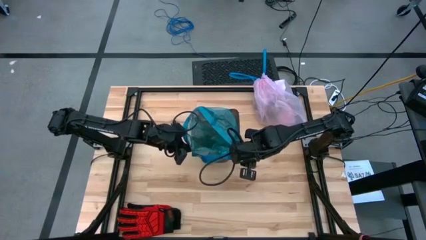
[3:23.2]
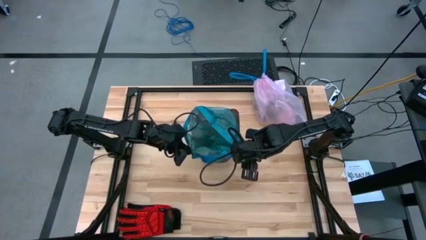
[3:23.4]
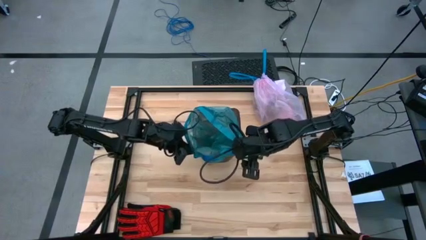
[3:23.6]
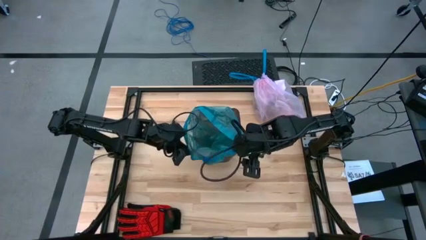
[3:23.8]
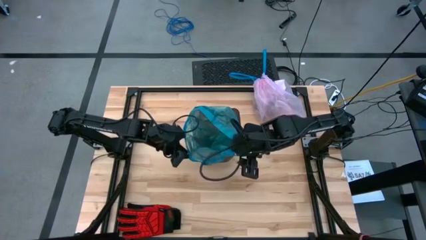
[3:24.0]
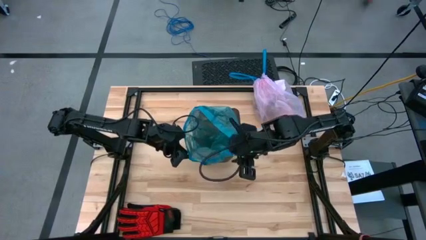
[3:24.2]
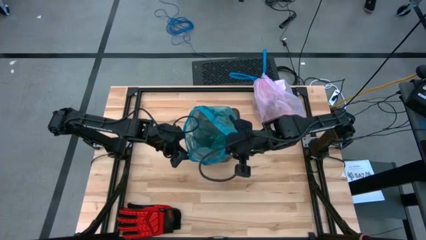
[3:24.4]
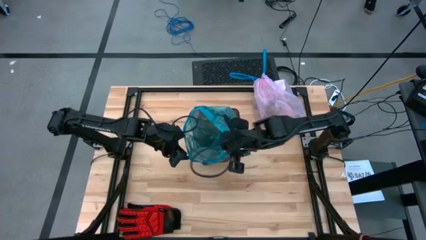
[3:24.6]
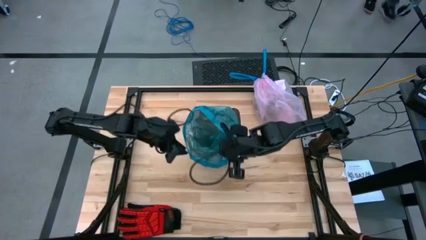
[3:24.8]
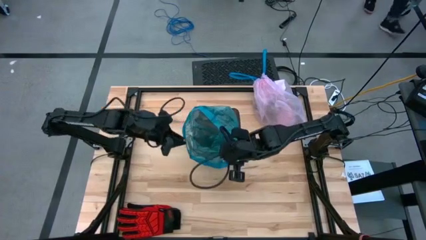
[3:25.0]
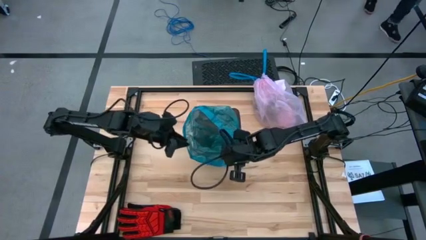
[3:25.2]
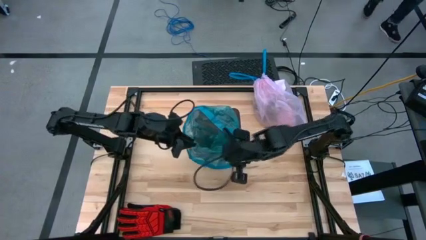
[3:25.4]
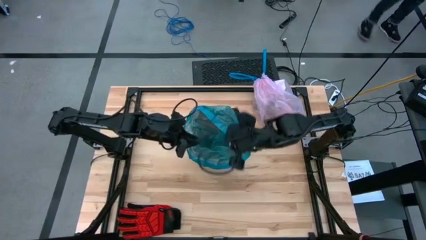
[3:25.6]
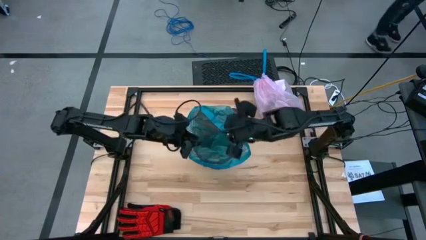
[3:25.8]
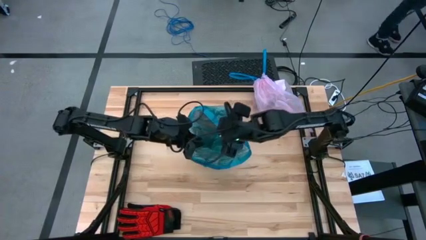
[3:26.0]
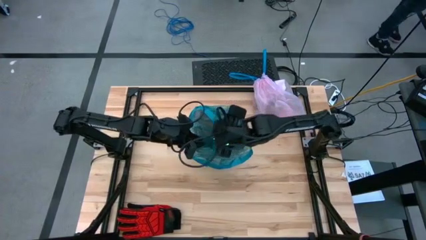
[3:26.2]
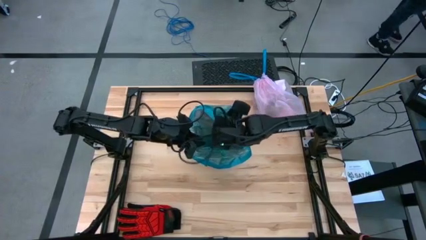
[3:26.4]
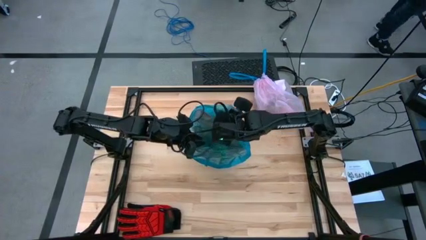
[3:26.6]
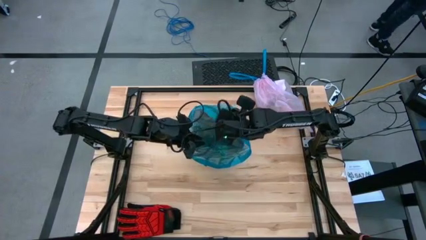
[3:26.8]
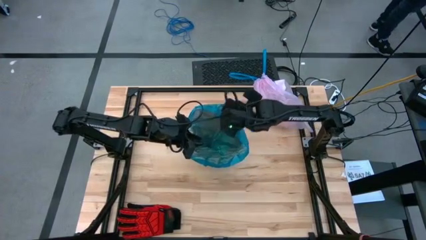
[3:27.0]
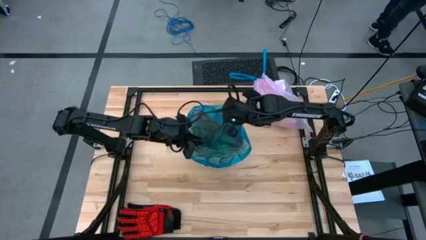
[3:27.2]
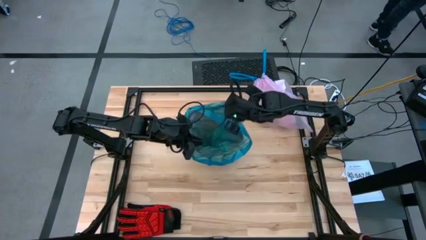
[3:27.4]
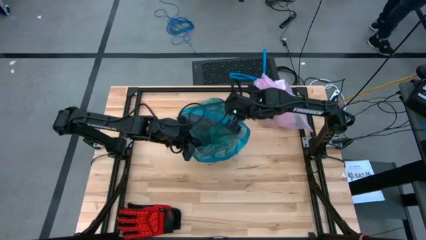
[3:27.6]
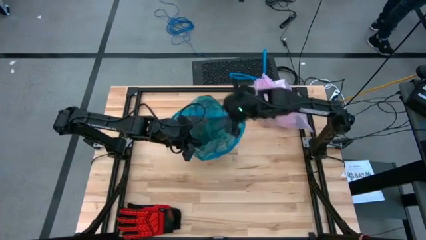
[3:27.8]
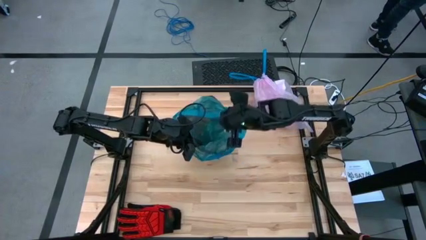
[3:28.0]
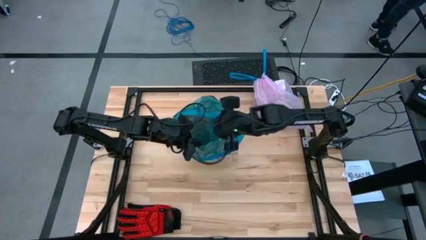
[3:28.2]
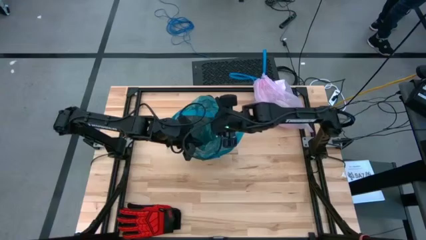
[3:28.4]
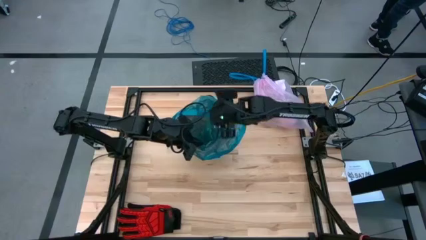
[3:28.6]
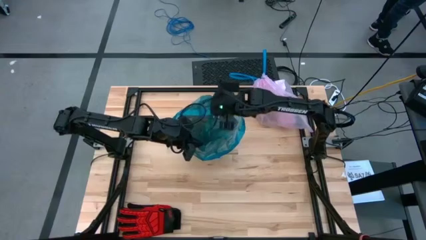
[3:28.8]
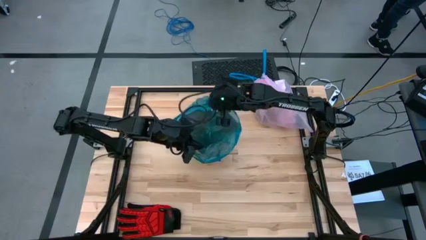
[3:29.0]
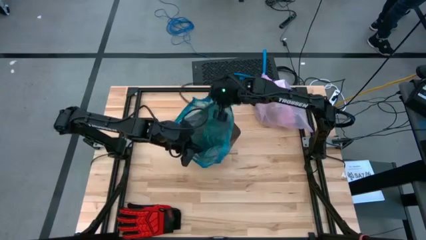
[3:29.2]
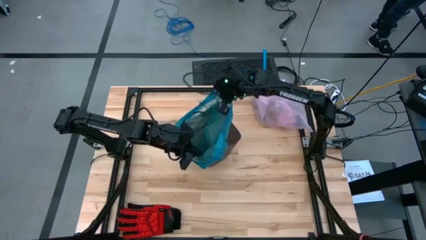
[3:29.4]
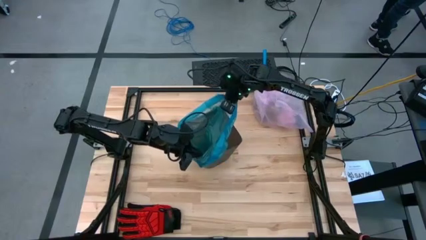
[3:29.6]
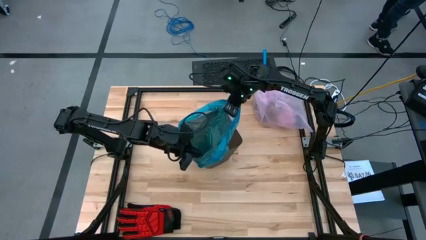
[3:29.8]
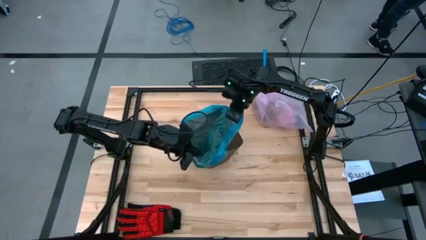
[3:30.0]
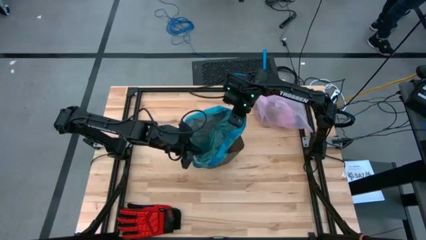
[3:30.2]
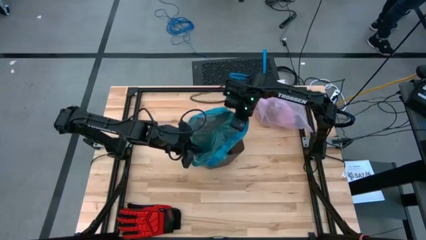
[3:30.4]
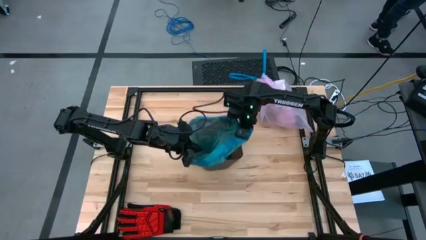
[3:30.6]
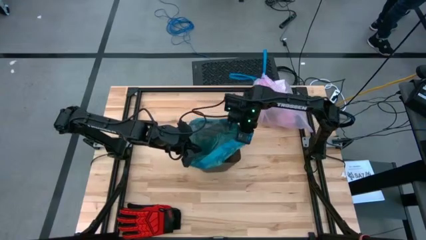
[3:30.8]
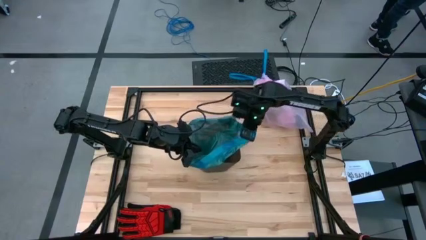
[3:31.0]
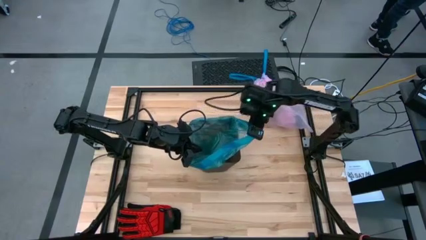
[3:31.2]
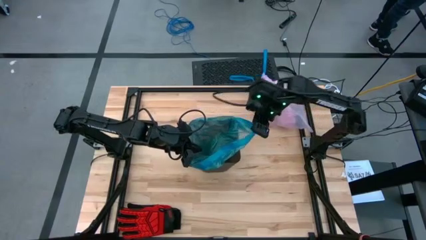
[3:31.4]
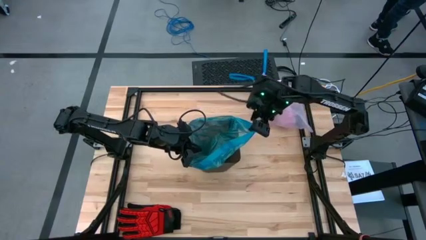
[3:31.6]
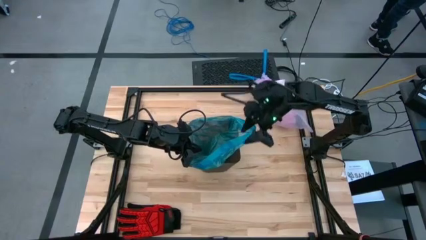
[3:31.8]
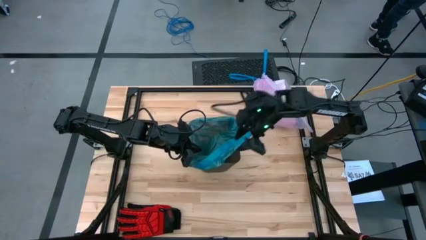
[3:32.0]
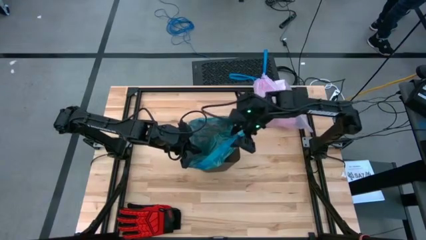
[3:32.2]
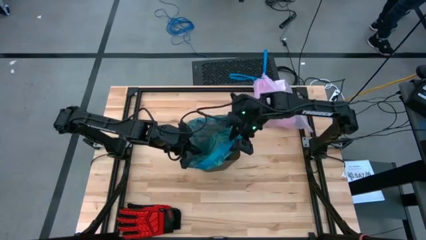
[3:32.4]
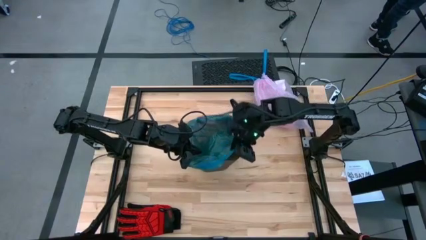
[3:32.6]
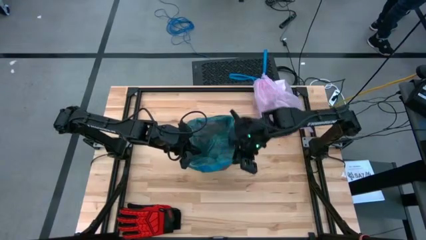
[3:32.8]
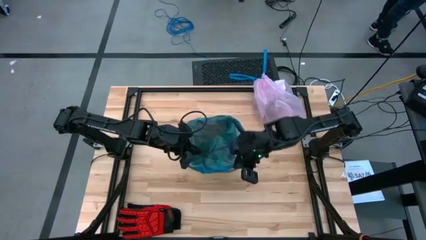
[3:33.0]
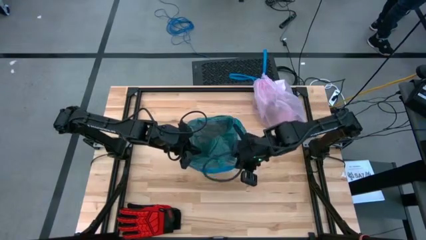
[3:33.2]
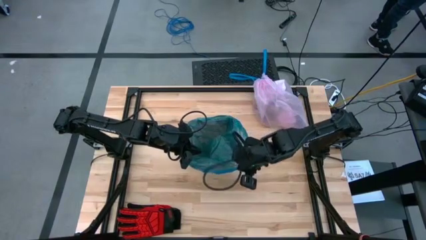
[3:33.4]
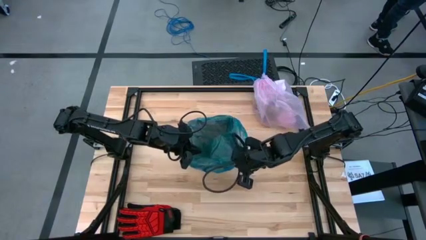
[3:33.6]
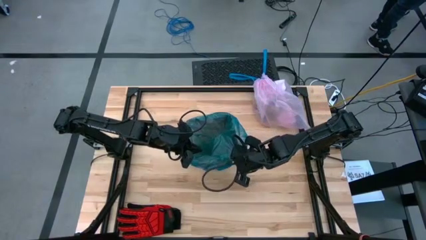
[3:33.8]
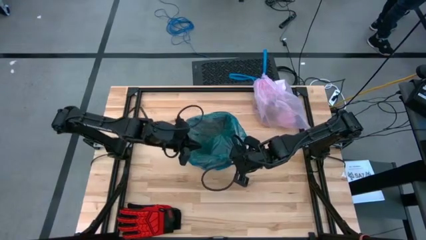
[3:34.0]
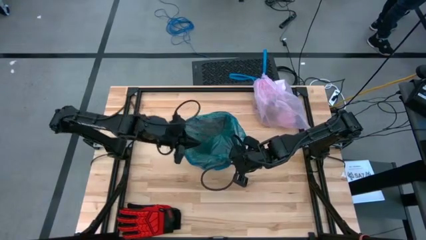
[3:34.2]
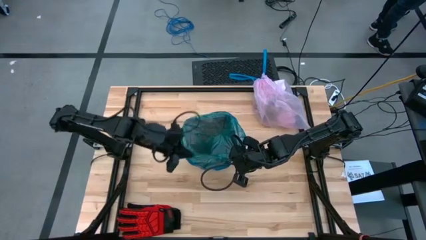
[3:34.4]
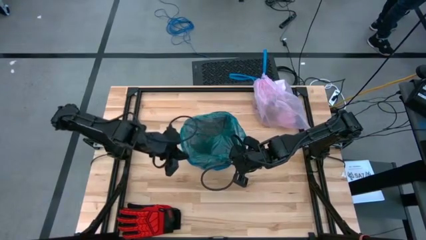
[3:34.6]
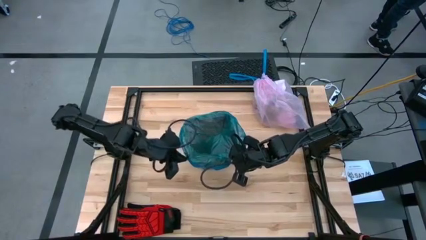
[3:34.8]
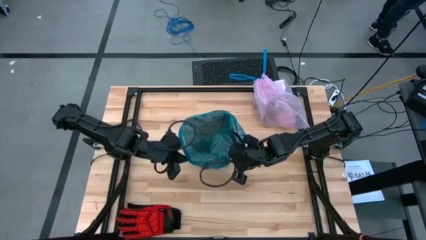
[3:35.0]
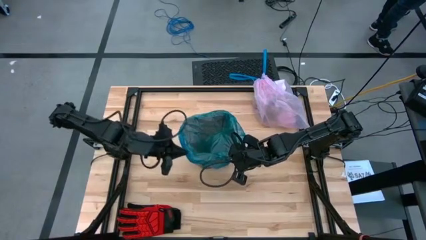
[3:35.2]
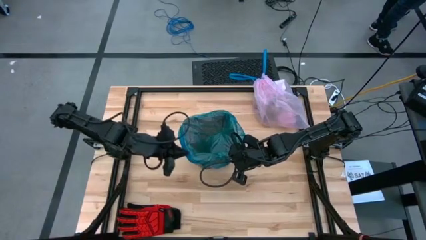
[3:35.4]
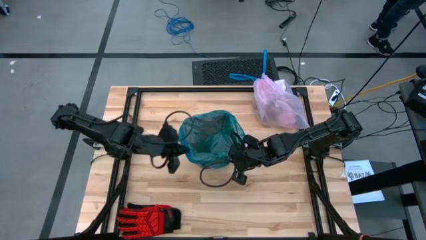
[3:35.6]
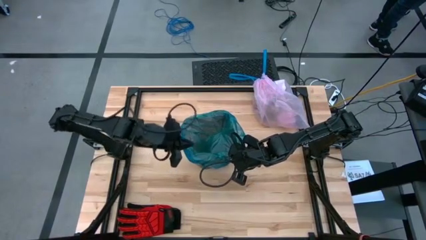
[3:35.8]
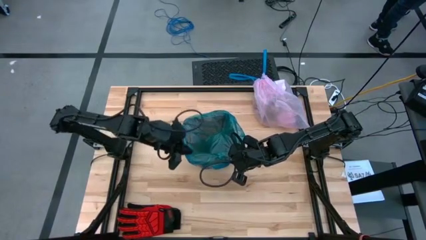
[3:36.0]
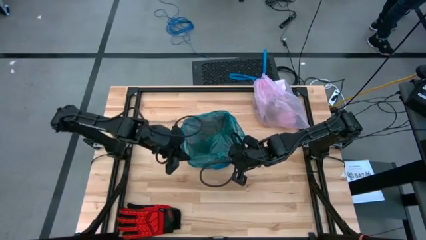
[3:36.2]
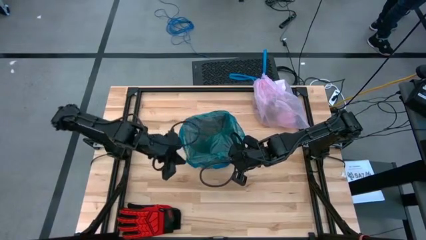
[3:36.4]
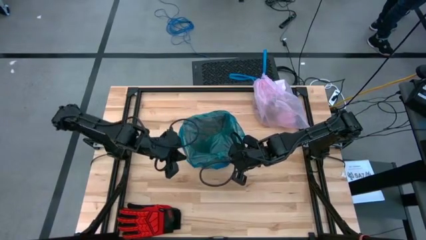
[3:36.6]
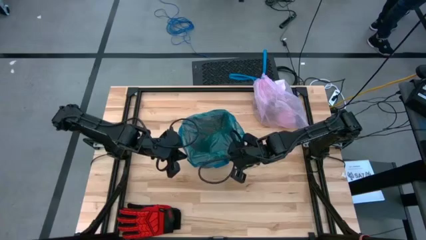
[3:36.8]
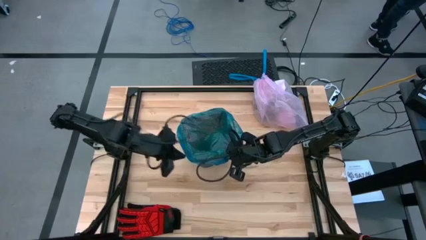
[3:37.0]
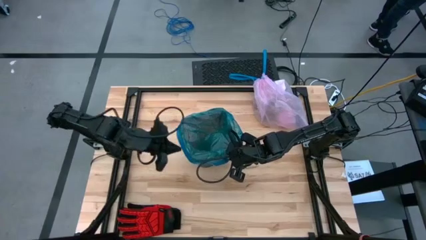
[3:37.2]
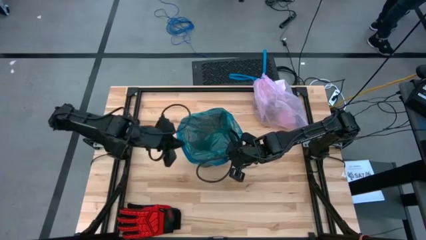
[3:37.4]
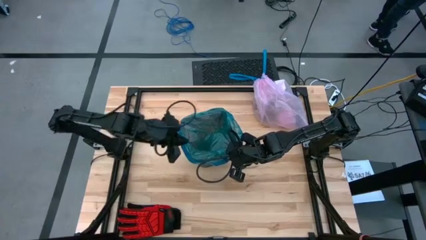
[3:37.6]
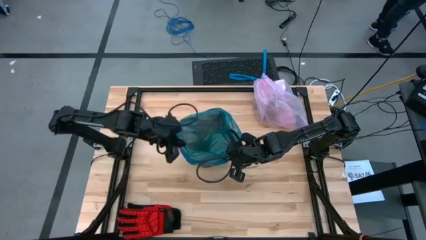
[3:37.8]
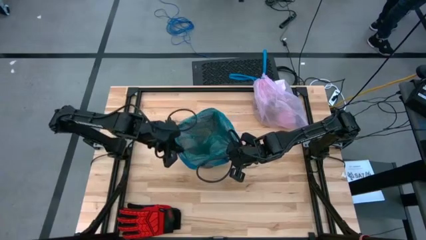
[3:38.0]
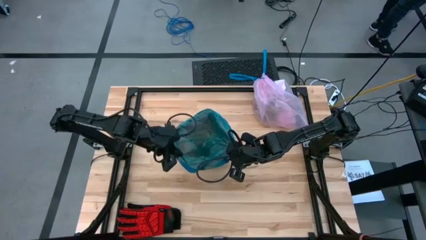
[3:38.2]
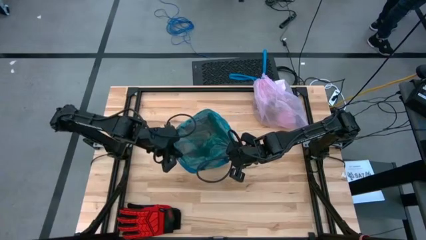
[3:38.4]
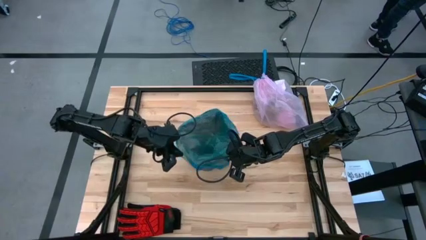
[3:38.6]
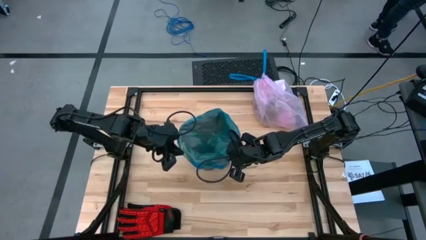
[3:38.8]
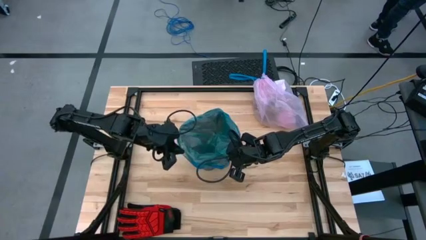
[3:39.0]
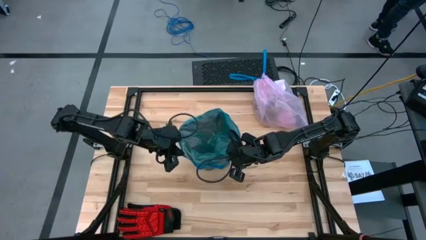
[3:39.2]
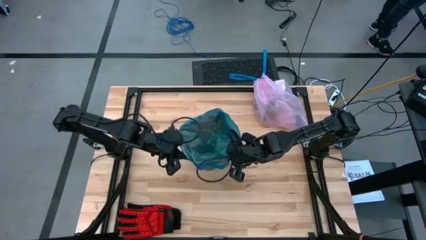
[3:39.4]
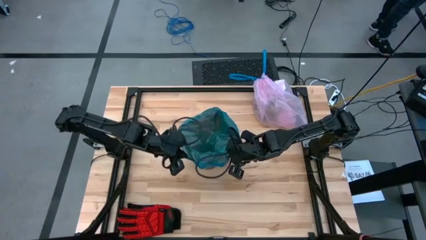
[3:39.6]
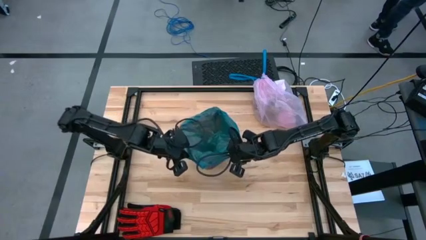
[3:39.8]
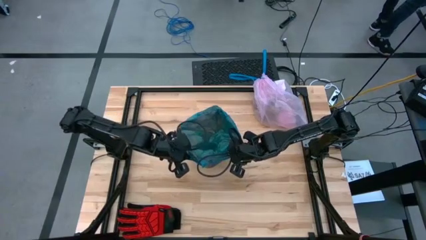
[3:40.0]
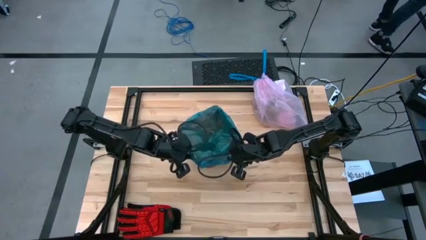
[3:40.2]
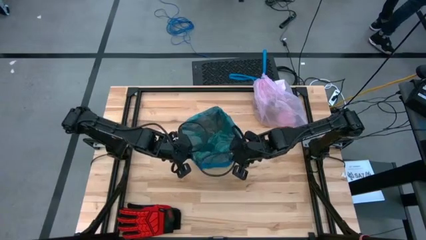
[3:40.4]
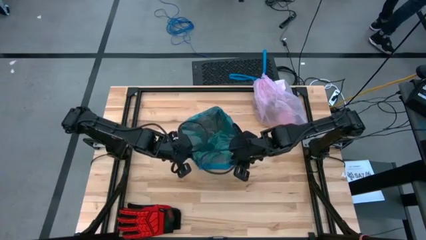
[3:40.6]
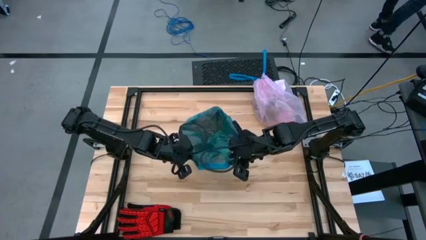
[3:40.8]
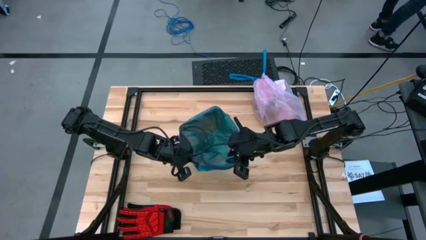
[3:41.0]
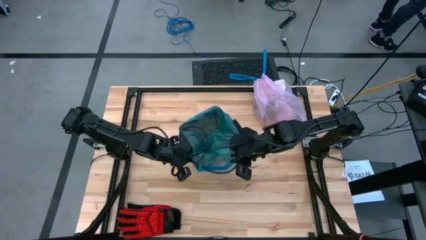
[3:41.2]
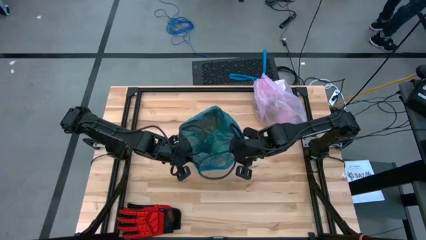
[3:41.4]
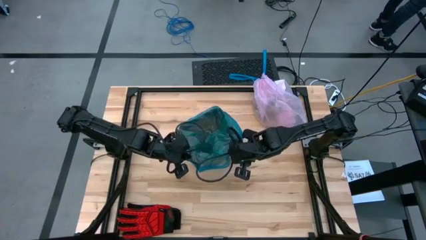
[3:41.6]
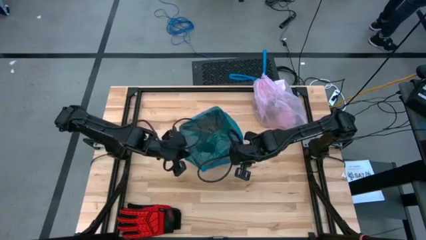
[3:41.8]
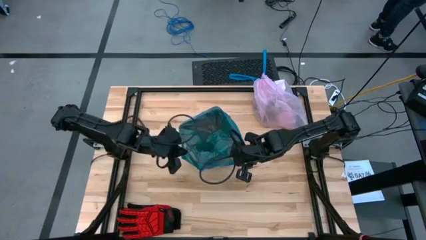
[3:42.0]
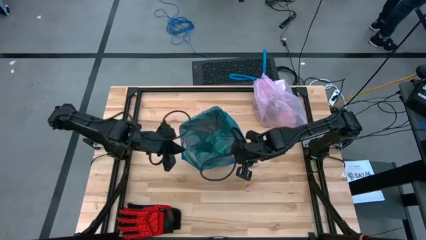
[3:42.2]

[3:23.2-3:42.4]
Task: place trash/remove bag and relplace
Insert the blue trash bag into the black trash bin
